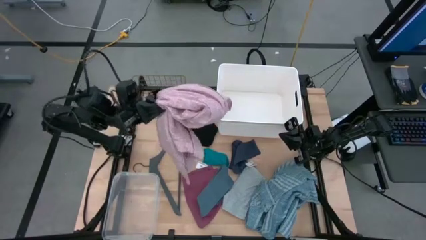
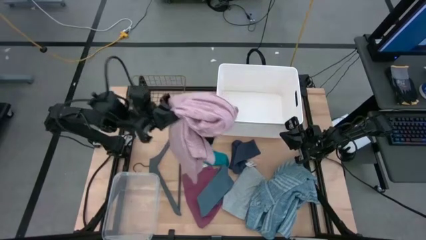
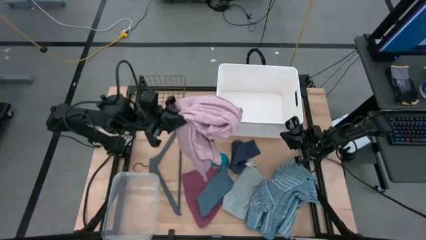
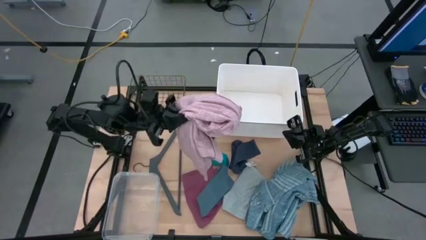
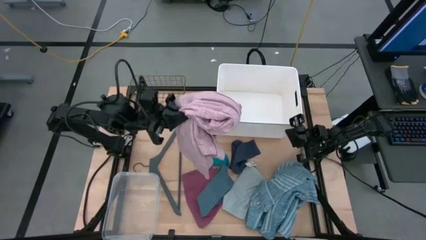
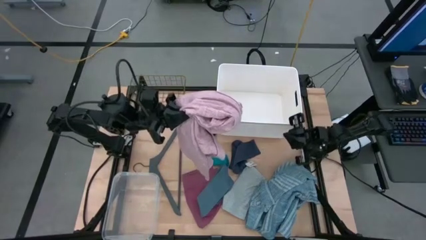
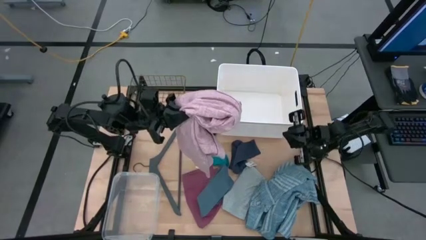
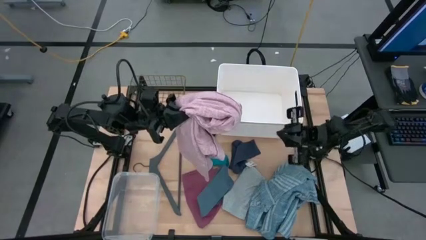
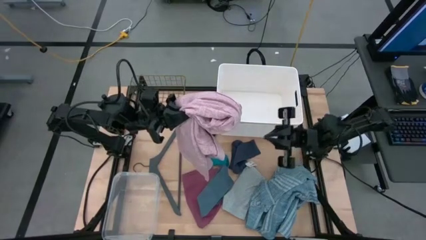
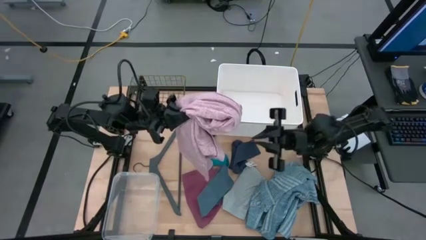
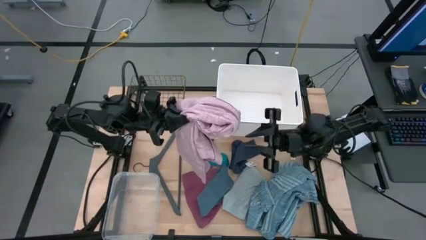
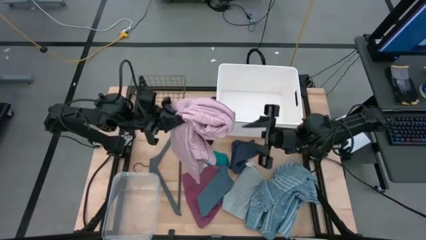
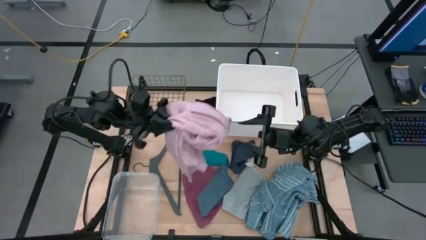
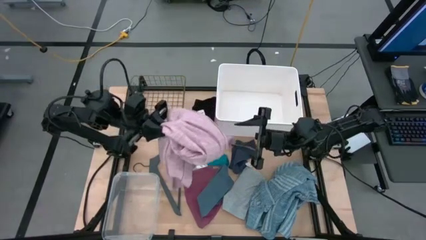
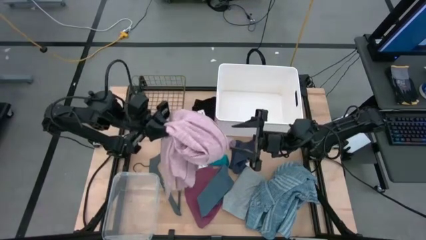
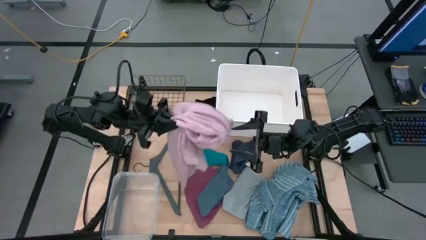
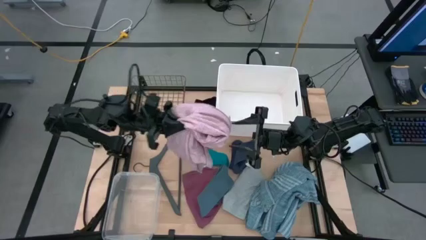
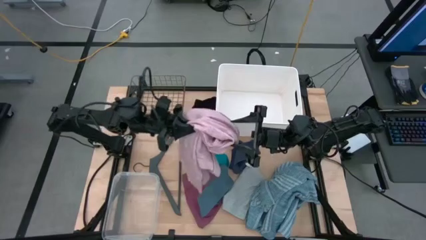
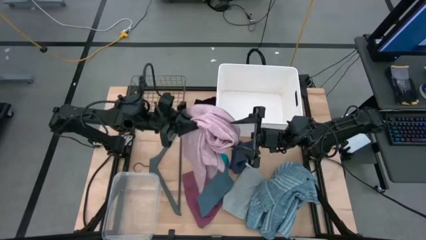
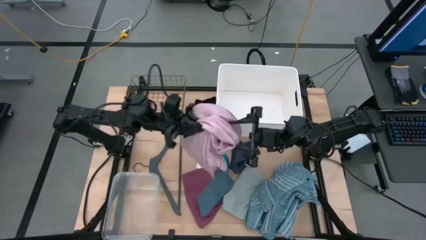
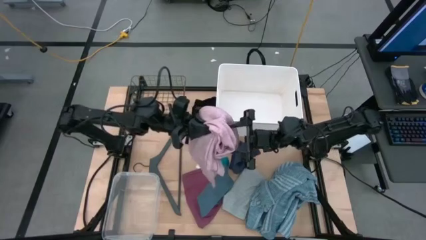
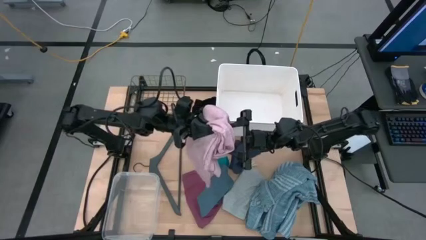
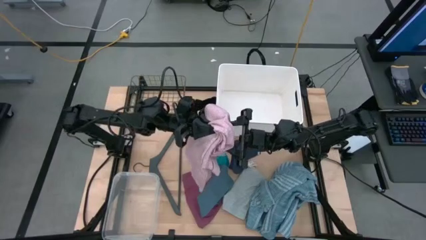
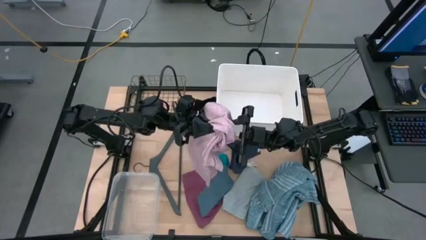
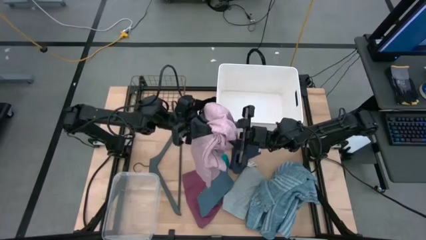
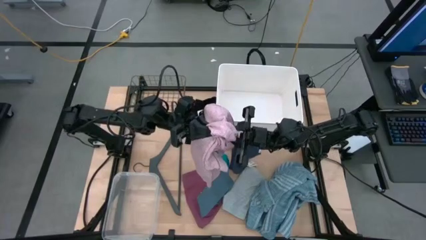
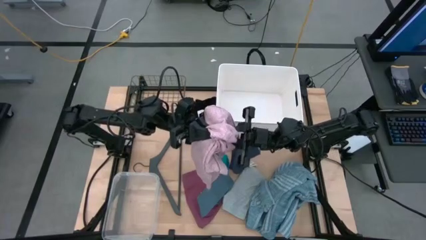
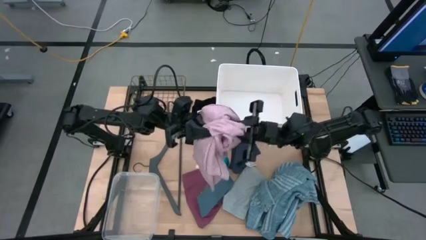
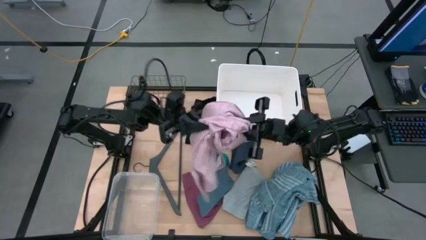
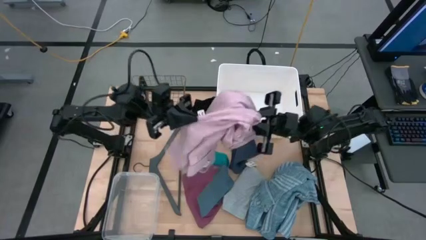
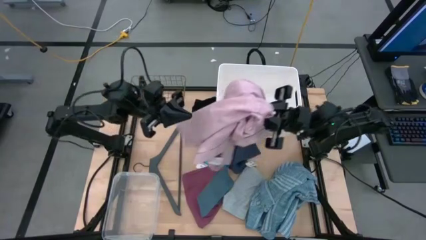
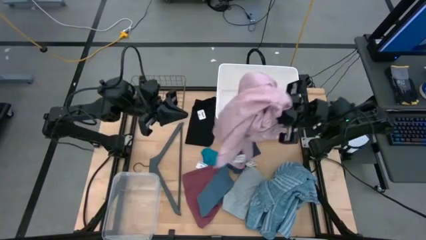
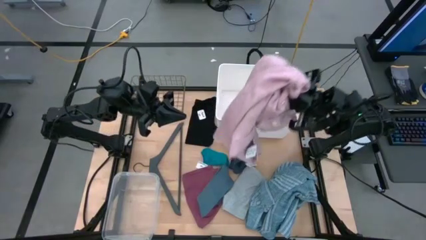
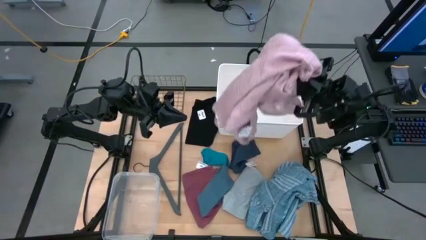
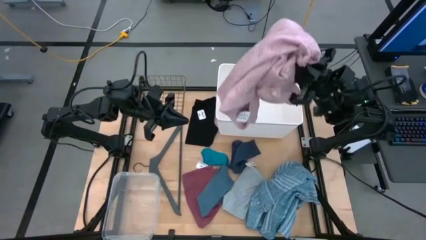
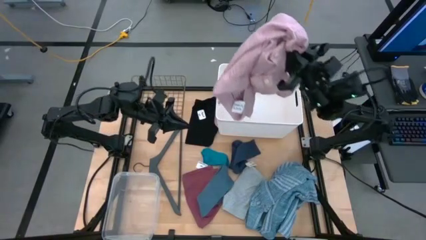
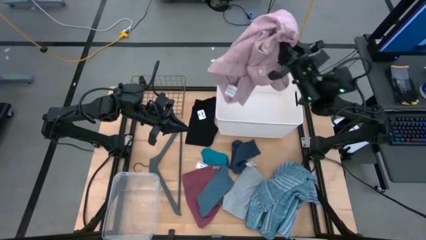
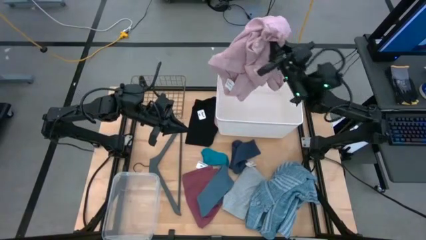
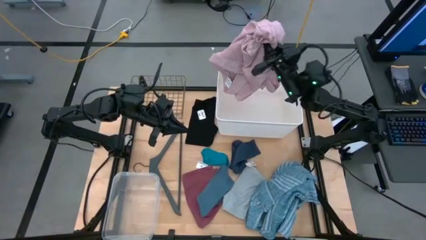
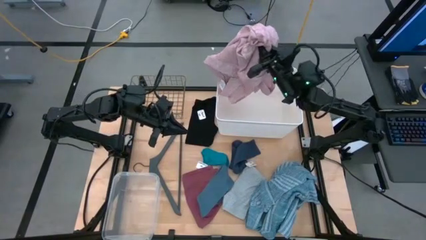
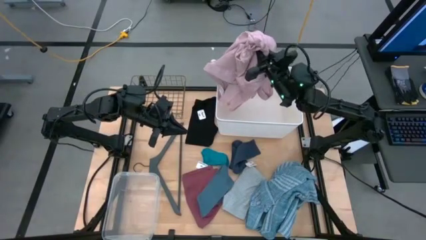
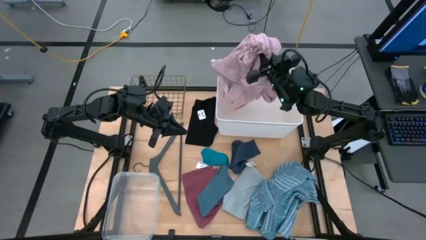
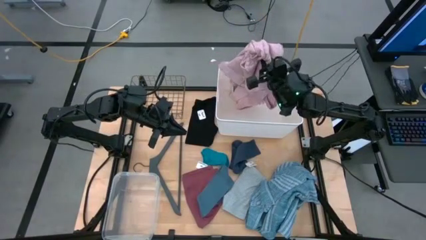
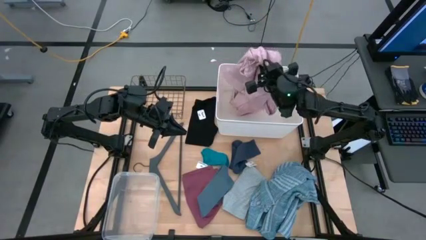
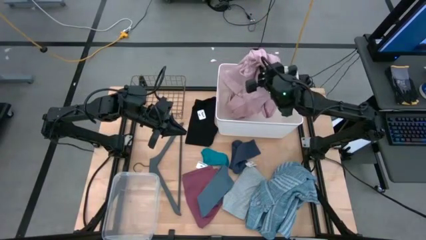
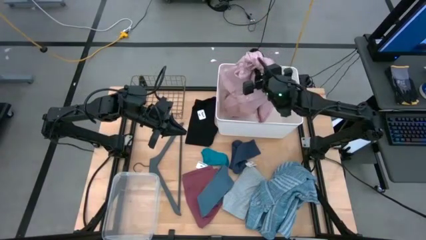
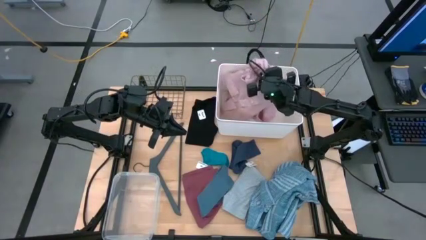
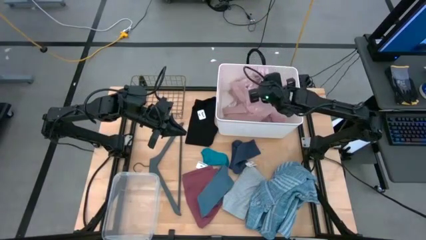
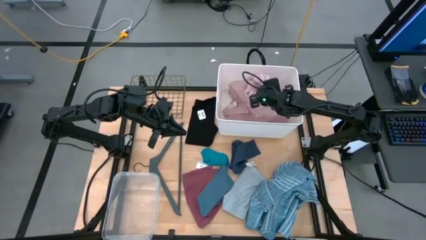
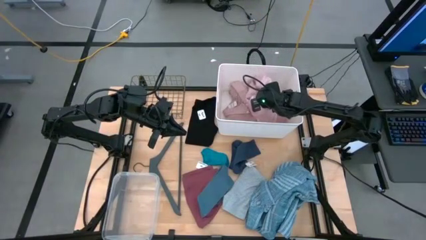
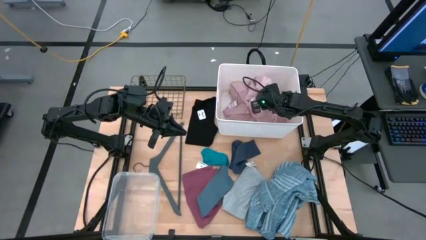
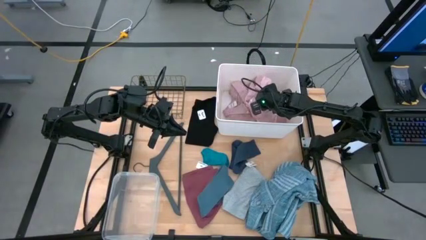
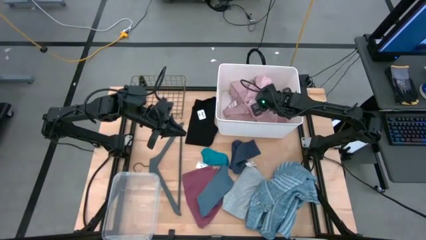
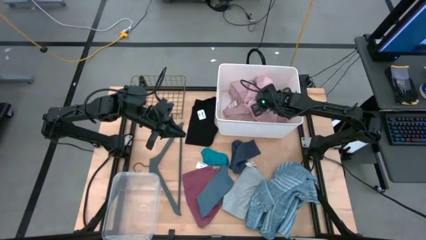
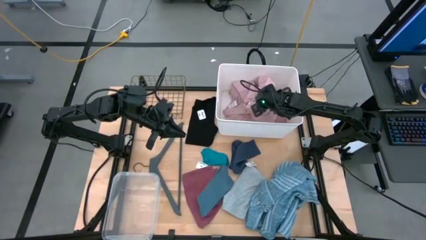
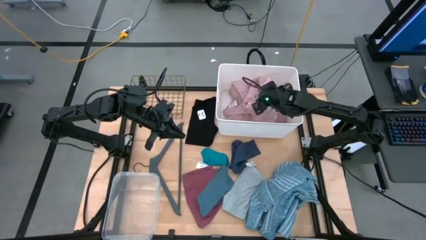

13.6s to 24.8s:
Task: Pick & Place Cloths
Put the pink long sleeve in the white bin

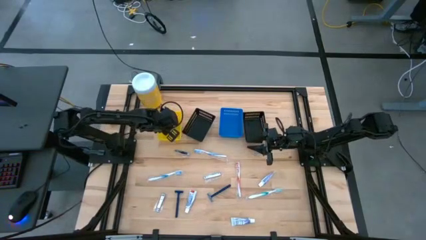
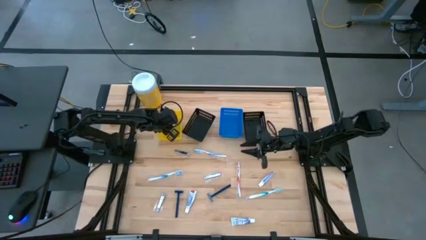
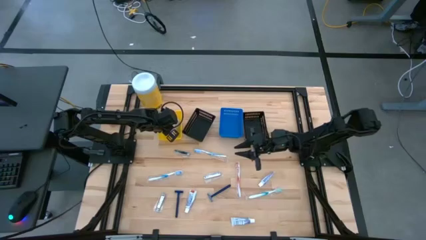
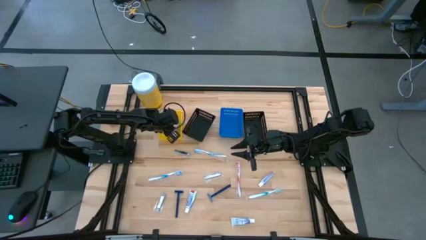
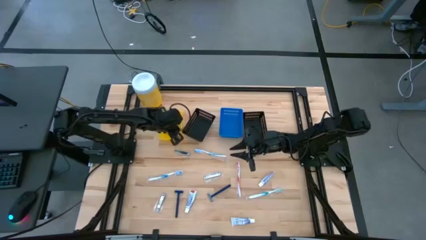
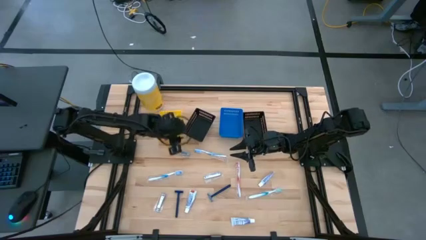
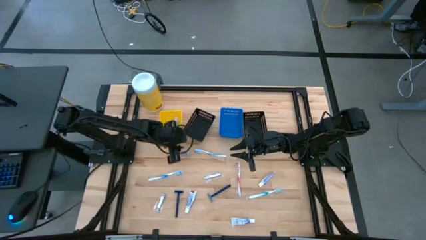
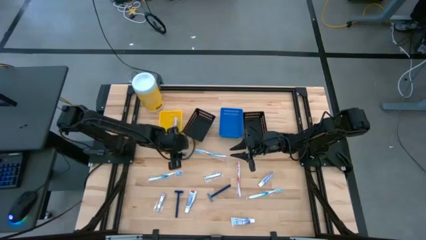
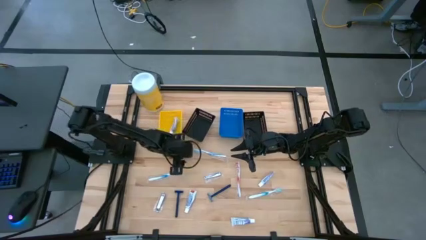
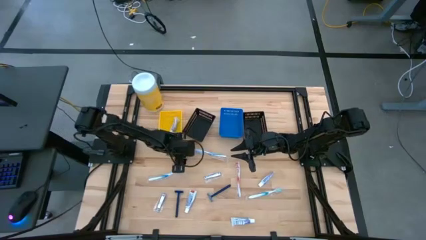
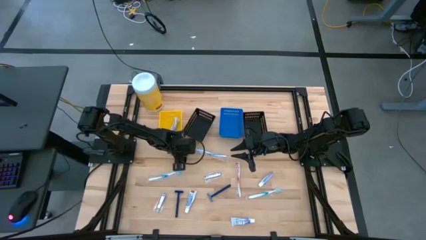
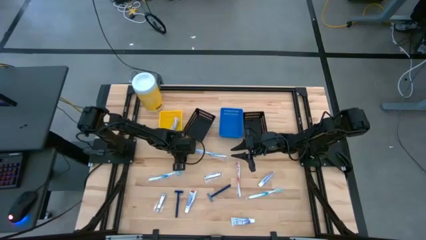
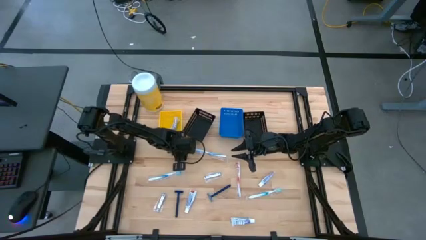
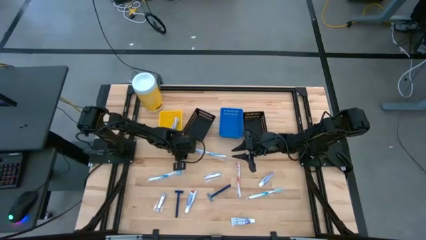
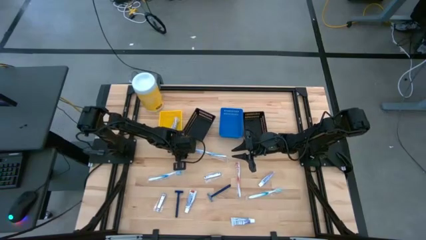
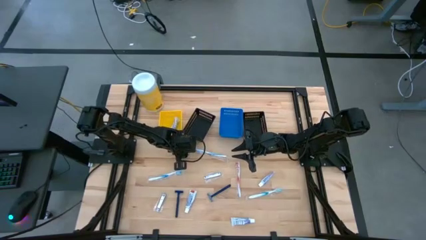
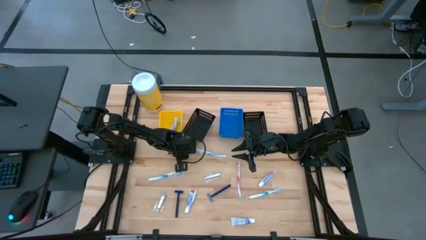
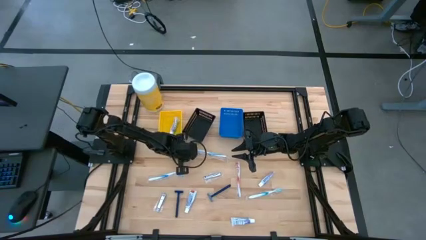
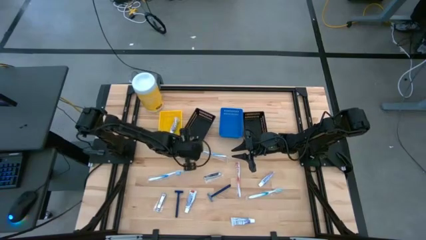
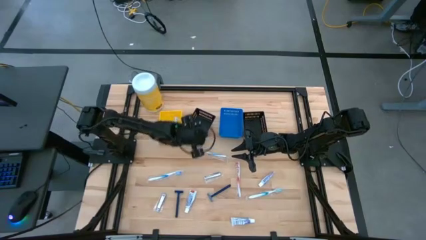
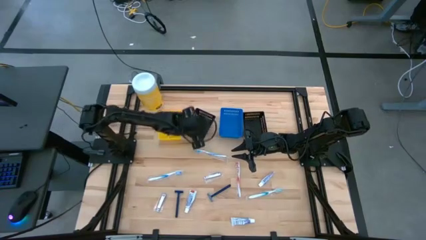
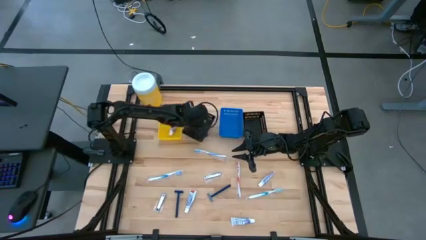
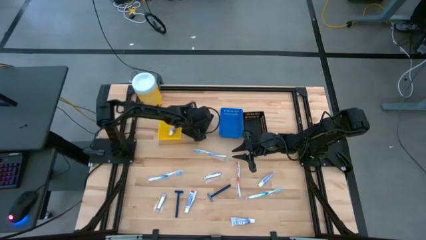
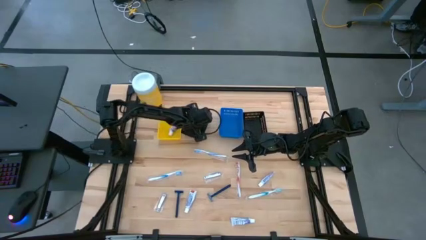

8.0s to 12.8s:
Task: Pick & Place Travel size toiletries
Put the silver nail cutter into the right black bin
